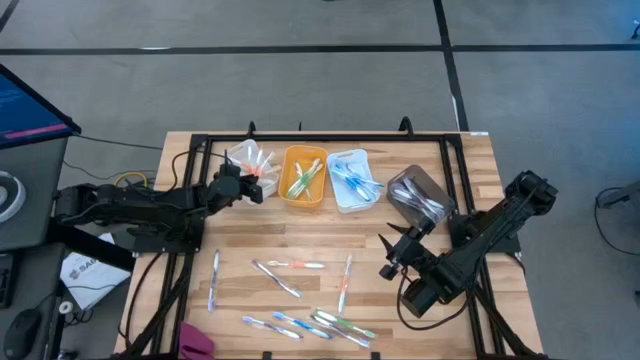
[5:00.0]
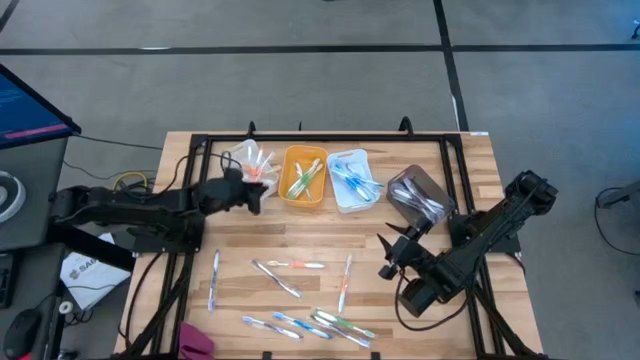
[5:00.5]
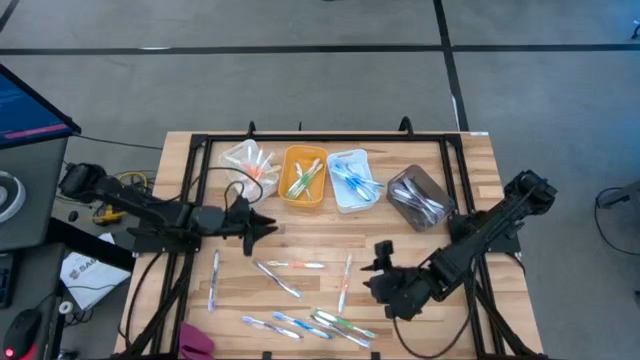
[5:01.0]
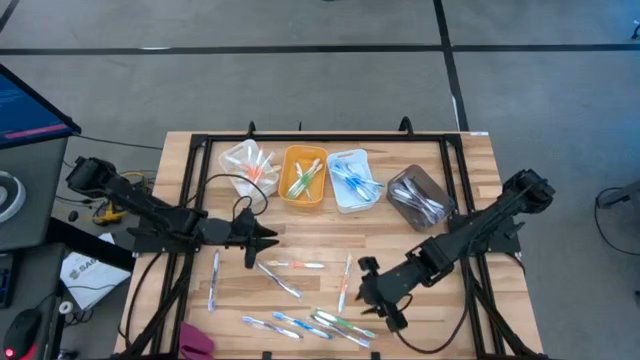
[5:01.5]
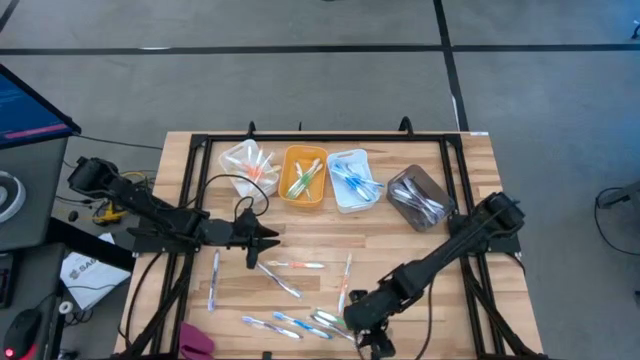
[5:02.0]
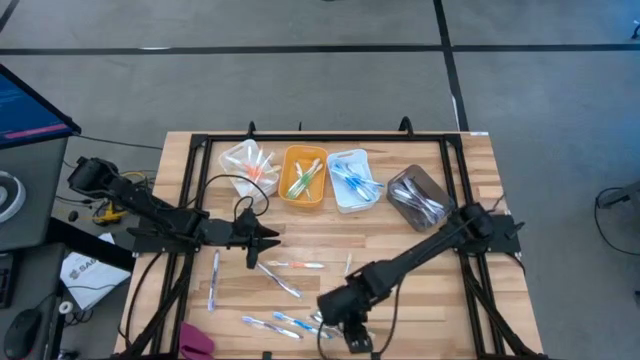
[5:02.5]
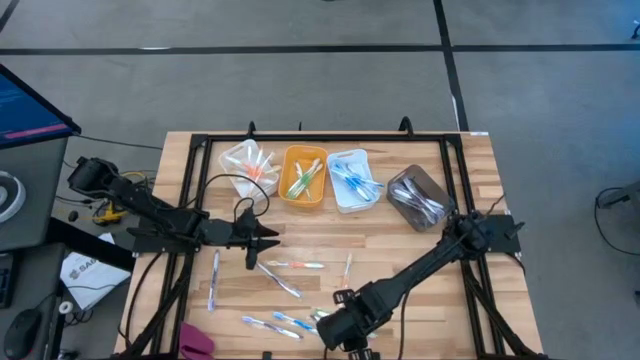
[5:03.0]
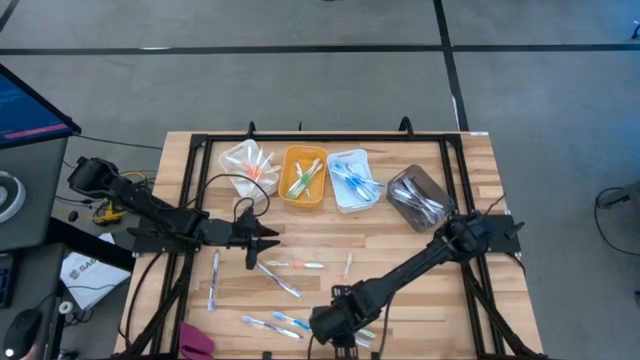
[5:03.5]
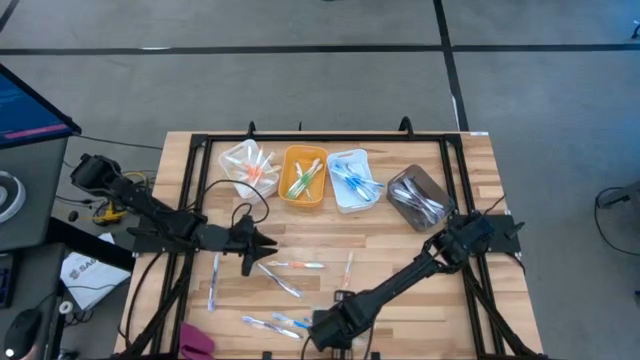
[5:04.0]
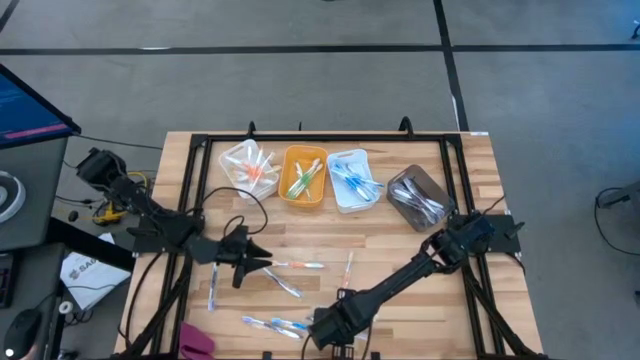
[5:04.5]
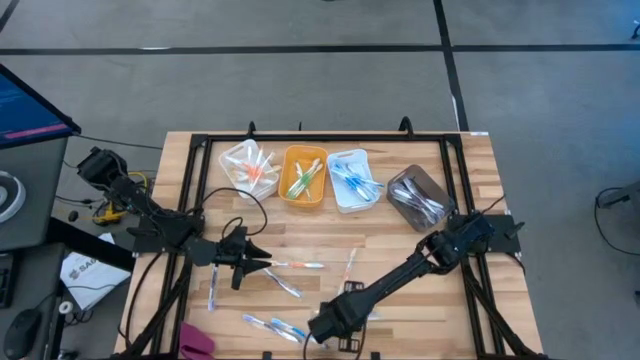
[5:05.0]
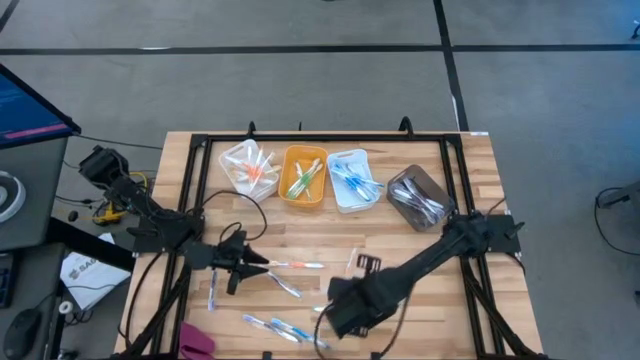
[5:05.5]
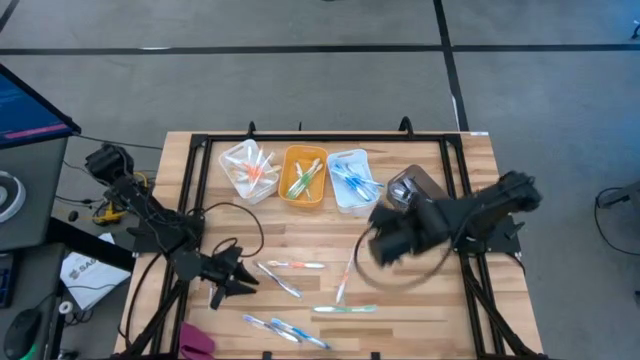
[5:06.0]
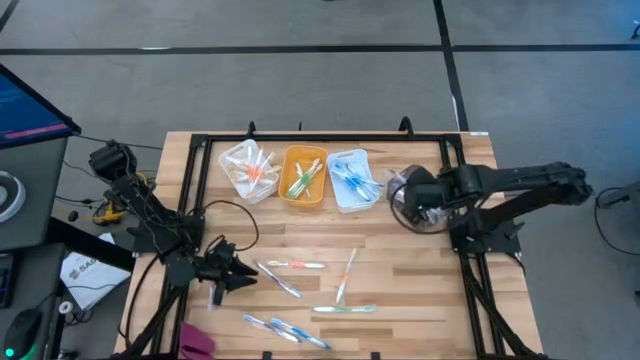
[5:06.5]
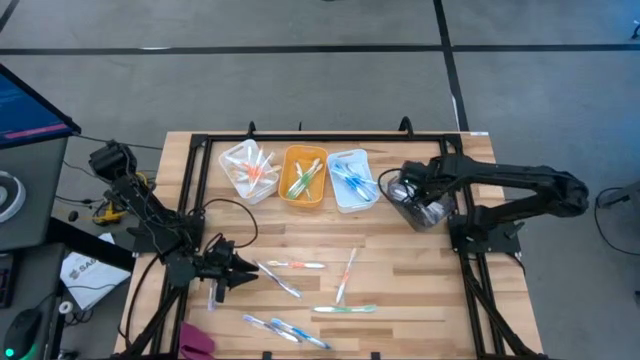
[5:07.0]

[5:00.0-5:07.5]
Task: Pick & Place Toothbrushes
Put the white violet toothbrush into the black transparent bin

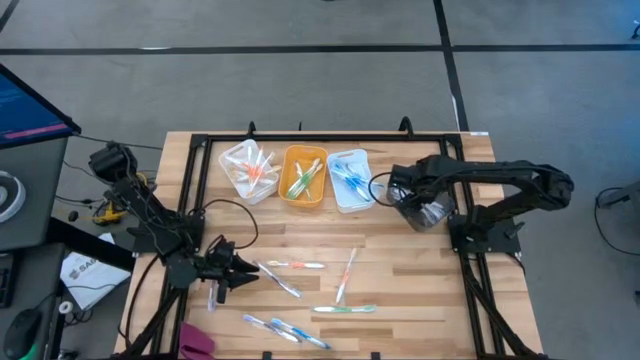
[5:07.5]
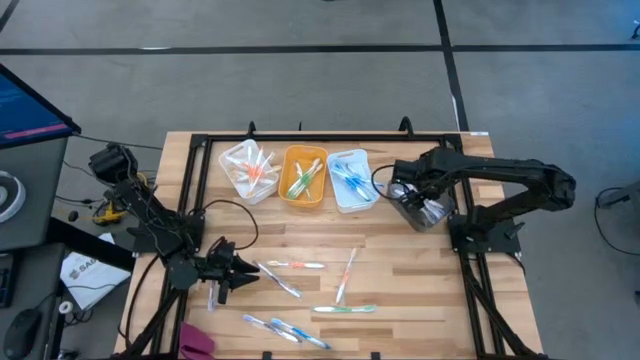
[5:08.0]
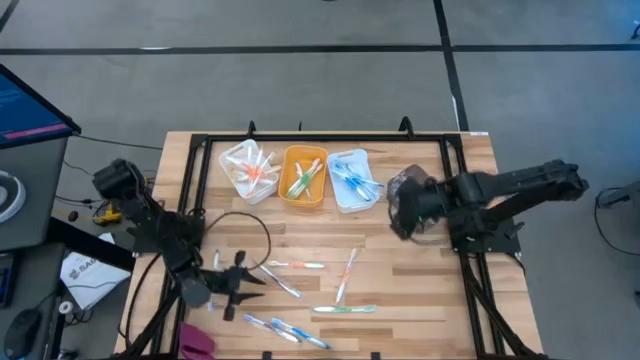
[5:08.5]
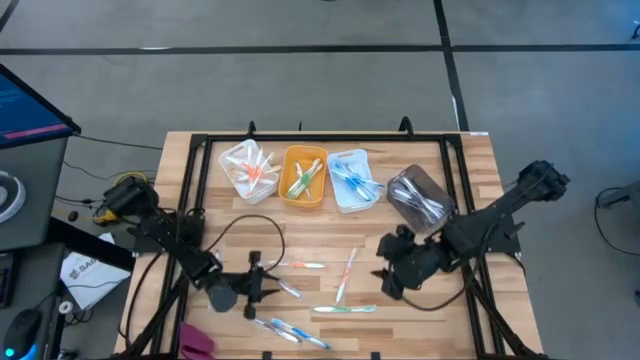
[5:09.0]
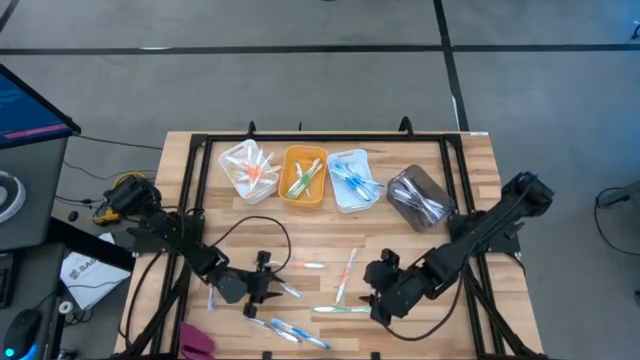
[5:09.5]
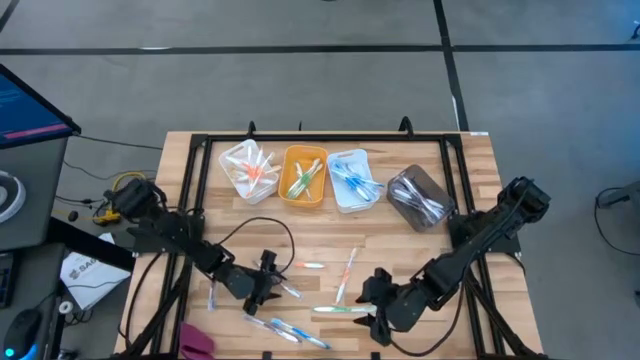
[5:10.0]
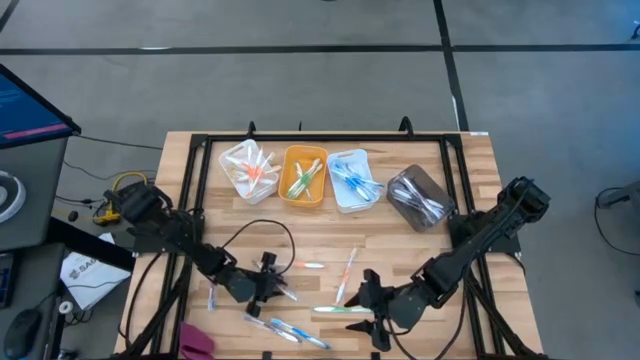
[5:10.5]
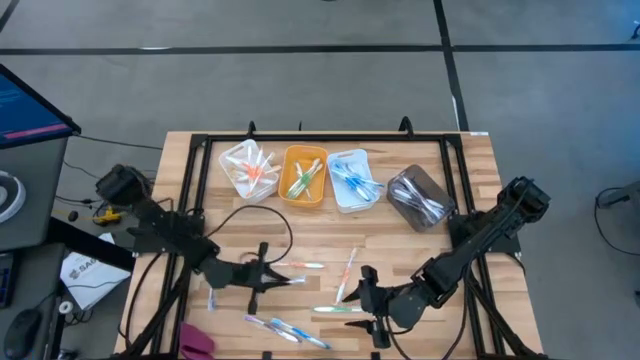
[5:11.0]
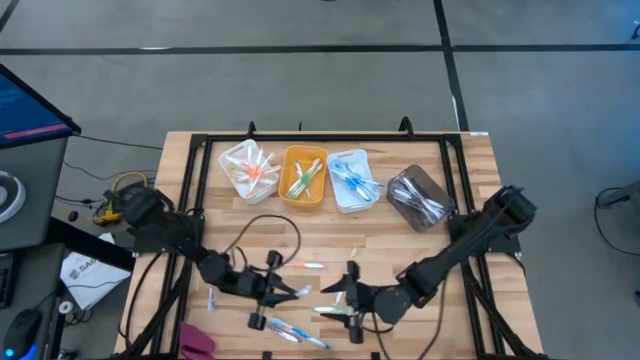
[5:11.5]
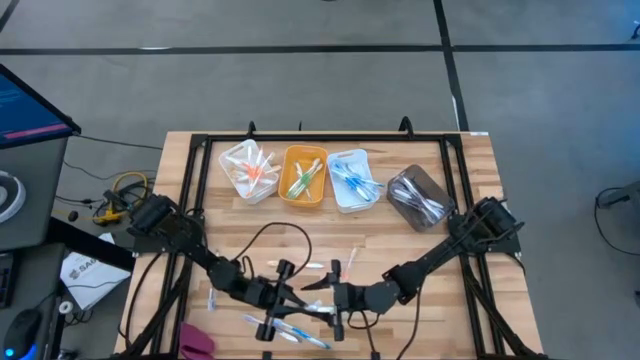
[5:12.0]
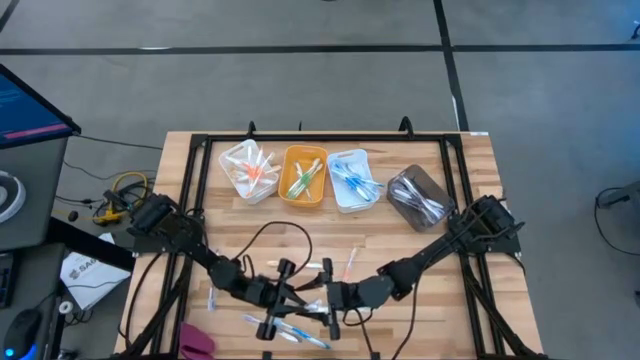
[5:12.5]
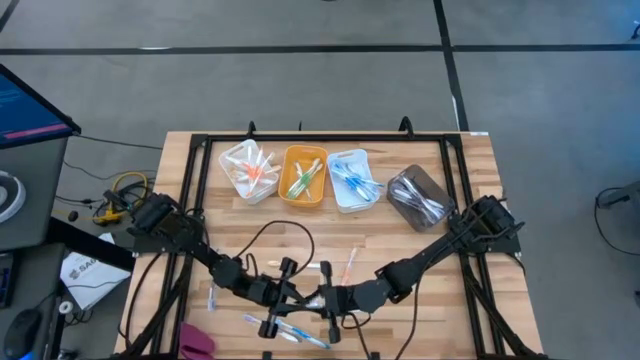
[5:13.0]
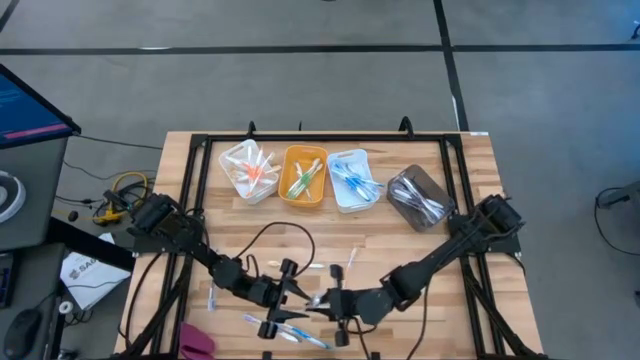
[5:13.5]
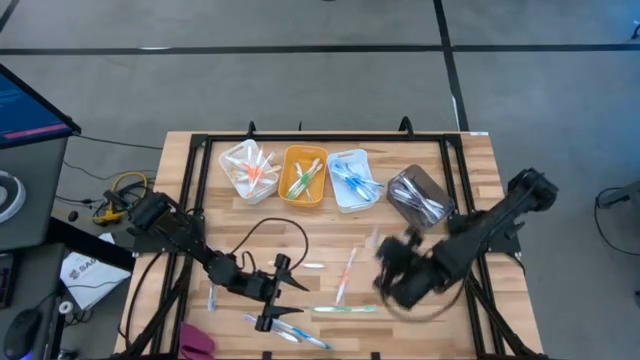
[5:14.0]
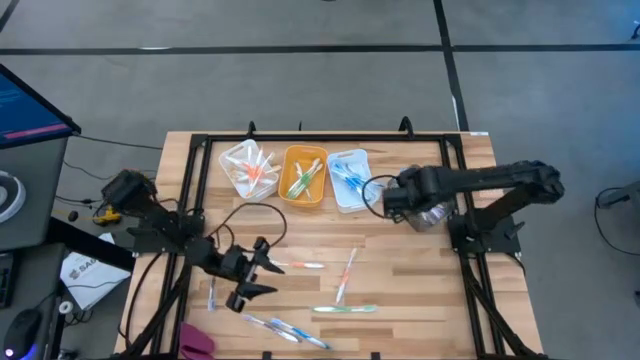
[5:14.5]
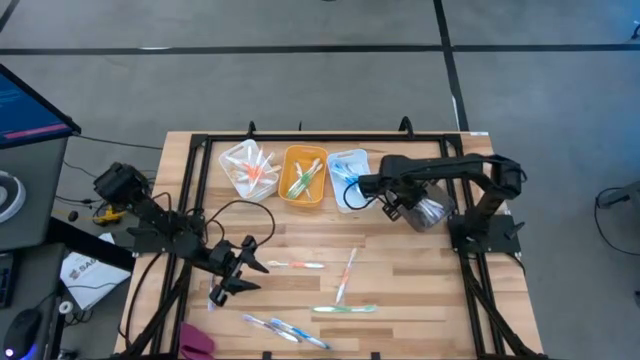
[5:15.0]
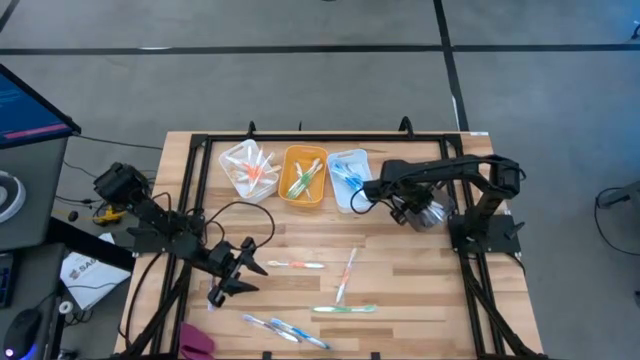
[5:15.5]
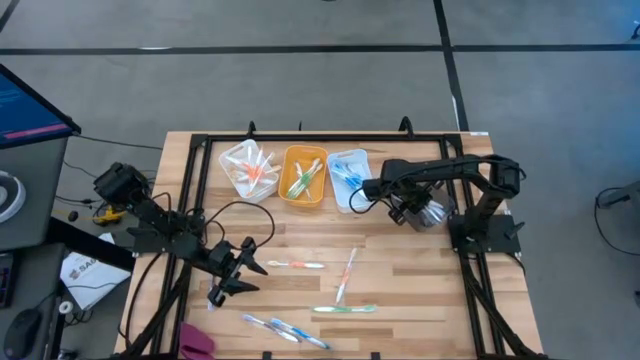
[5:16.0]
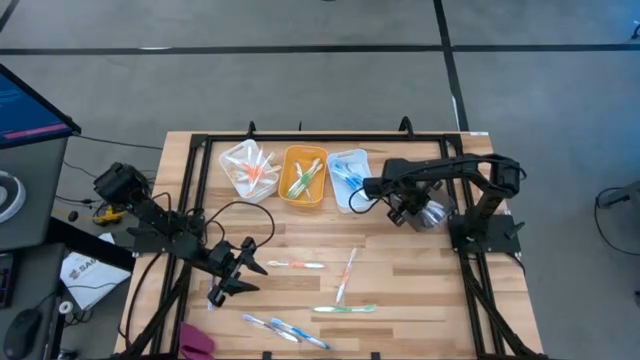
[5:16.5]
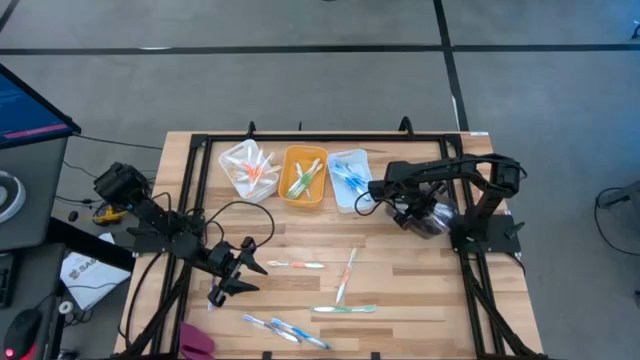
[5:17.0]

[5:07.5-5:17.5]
Put the white violet toothbrush into the black transparent bin

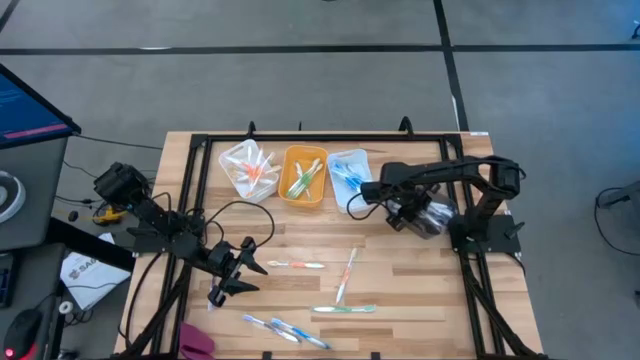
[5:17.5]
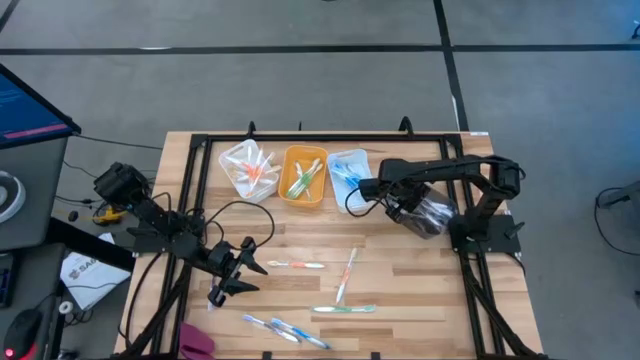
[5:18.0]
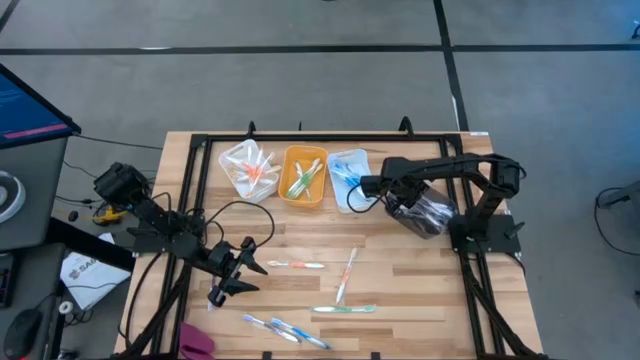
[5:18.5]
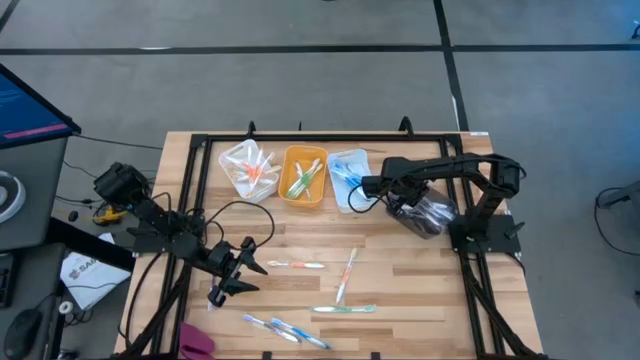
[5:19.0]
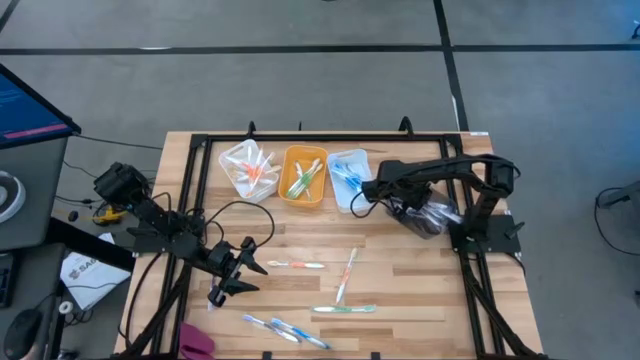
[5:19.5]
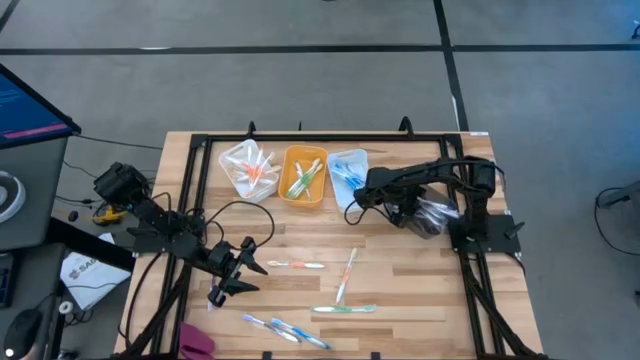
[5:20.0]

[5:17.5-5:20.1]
Adjust the white violet toothbrush from the black transparent bin

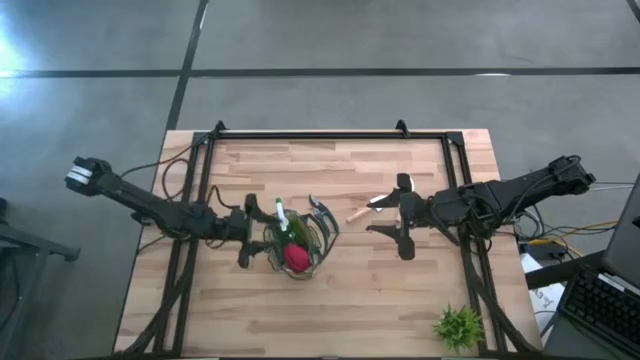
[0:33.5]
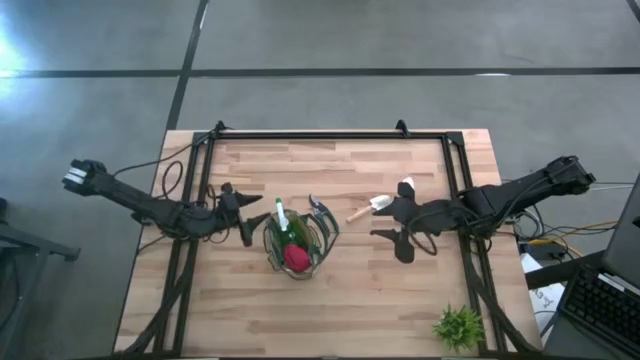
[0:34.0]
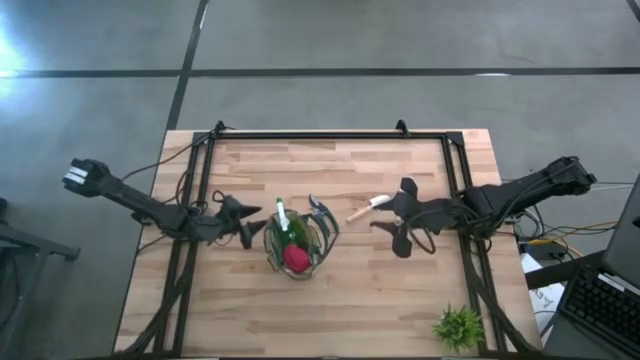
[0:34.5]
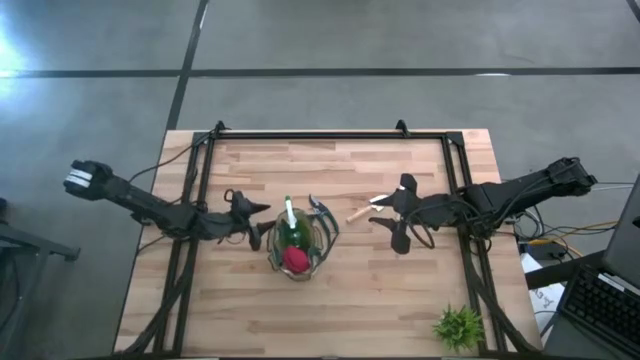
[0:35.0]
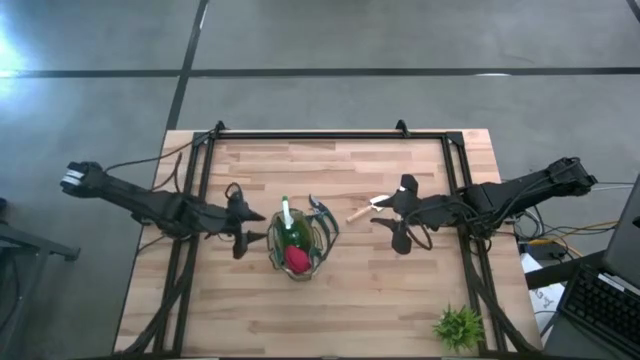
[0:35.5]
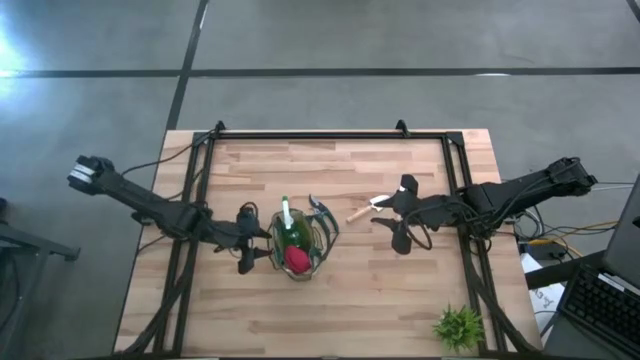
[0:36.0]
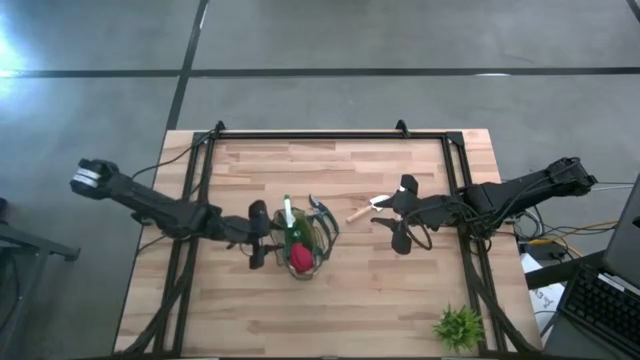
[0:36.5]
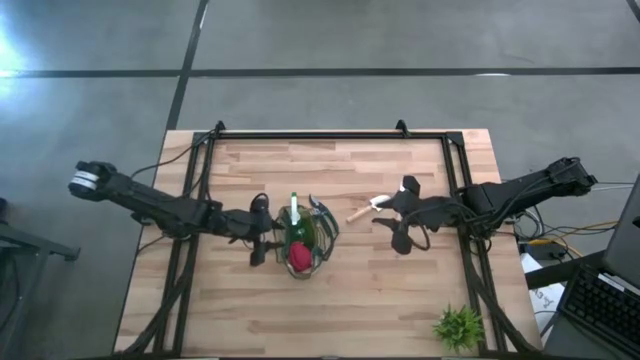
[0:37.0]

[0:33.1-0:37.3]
Task: Pick & Place Garden tools in Gardening bag
Adjust the gardening bag
